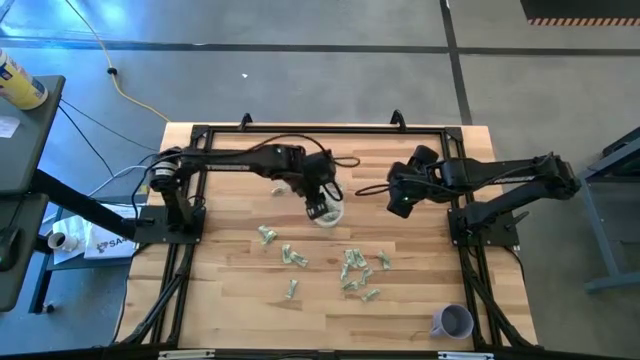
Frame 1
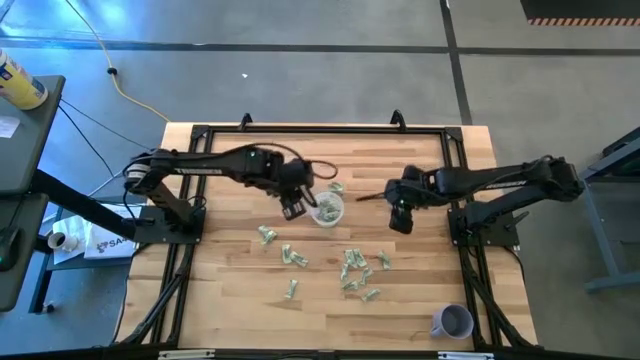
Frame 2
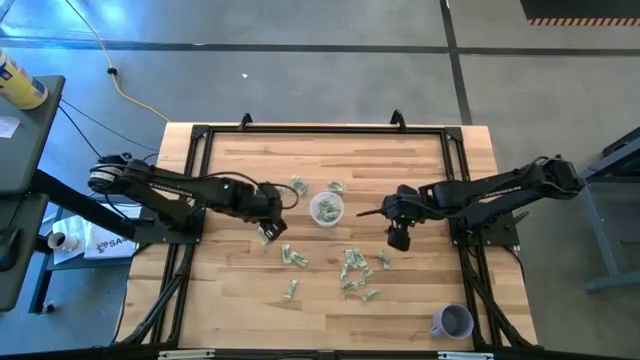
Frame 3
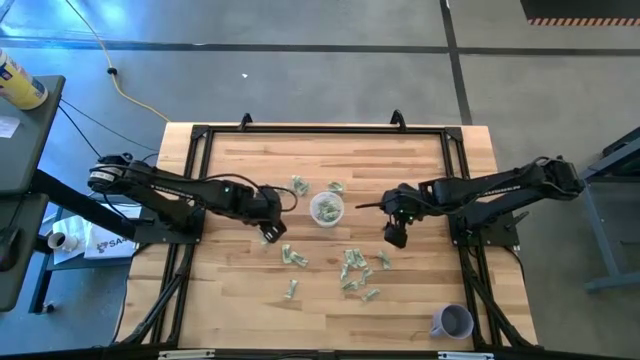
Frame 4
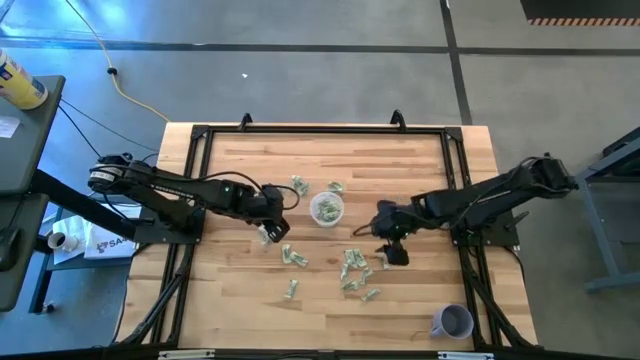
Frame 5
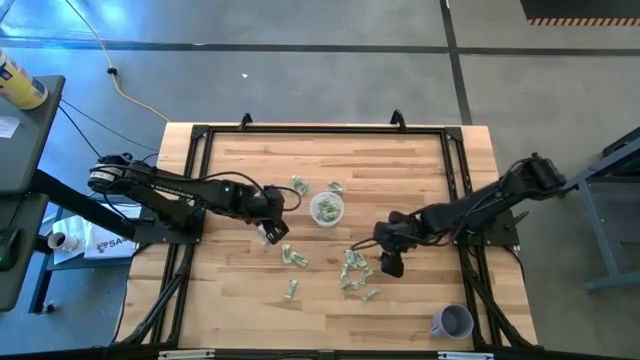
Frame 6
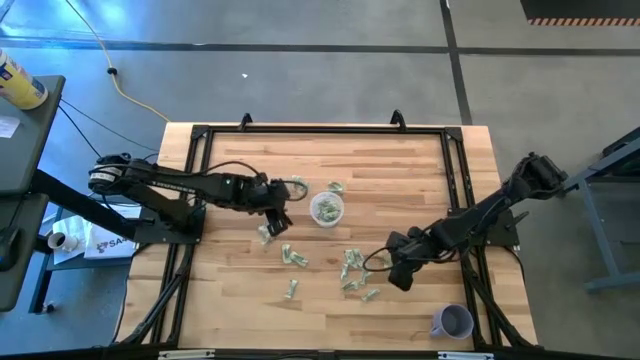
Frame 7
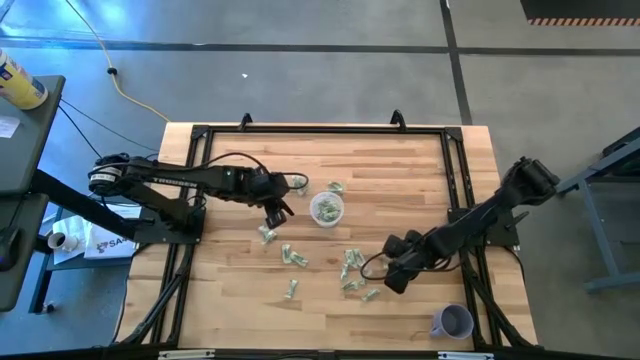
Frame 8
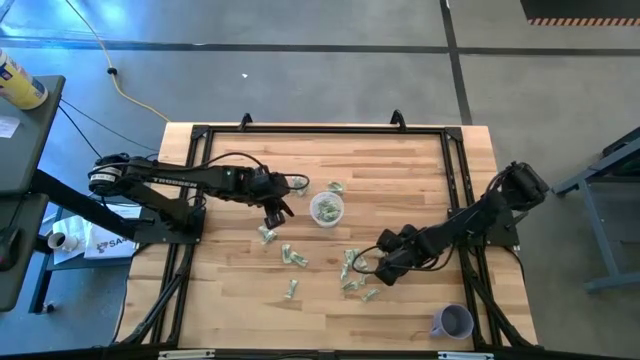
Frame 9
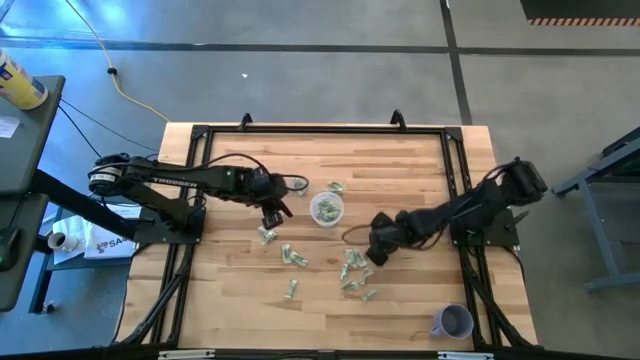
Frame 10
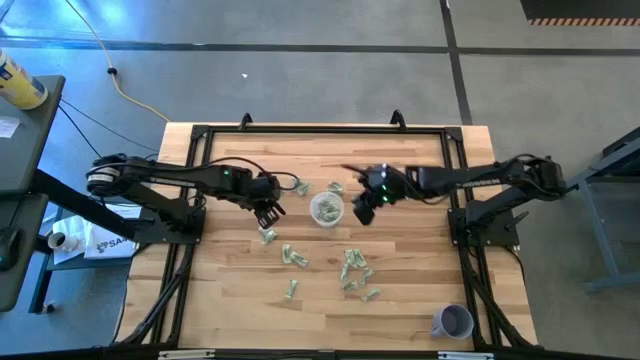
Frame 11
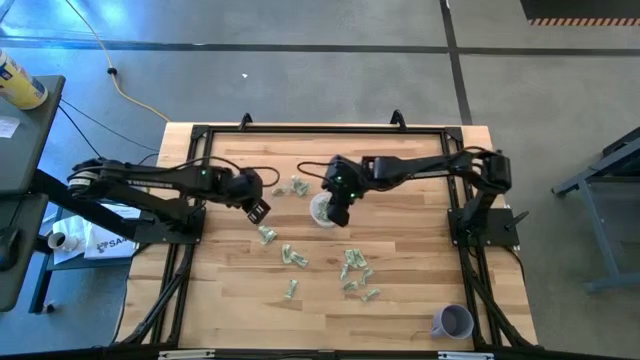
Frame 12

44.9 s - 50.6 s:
Task: Pick and place Stevia / Truvia into bins
Put the white stevia packet into the transparent container

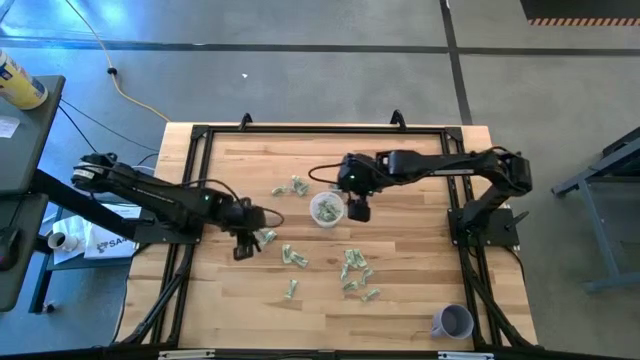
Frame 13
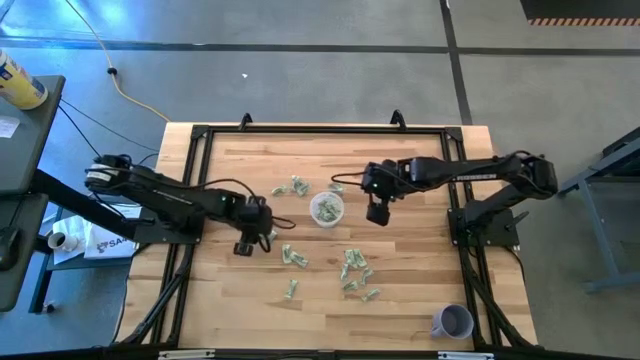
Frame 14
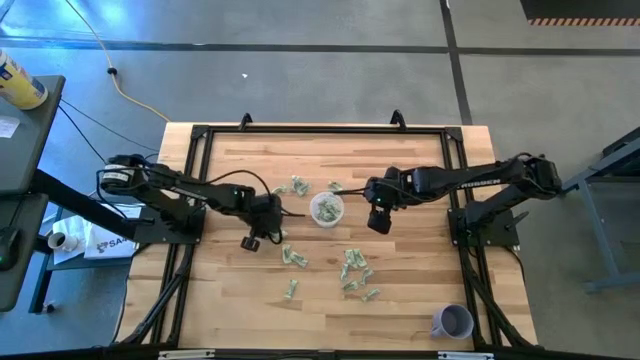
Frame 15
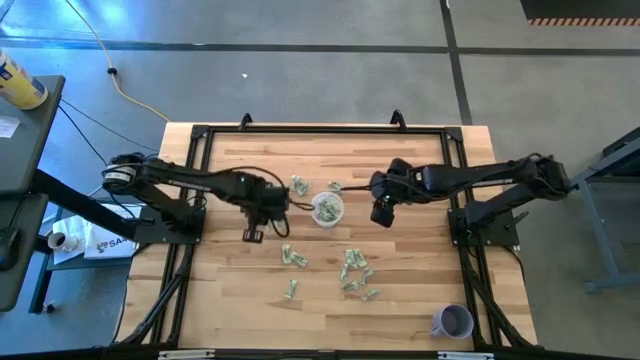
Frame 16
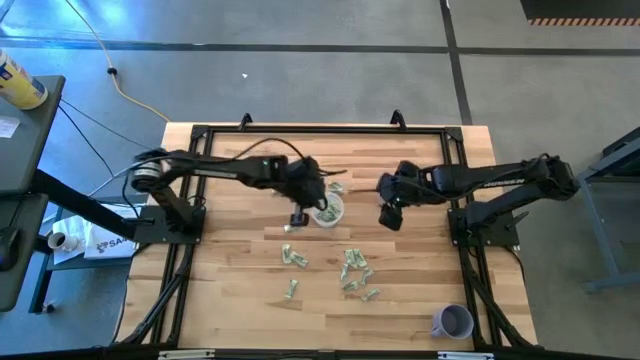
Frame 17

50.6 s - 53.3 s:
Put the white stevia packet into the transparent container

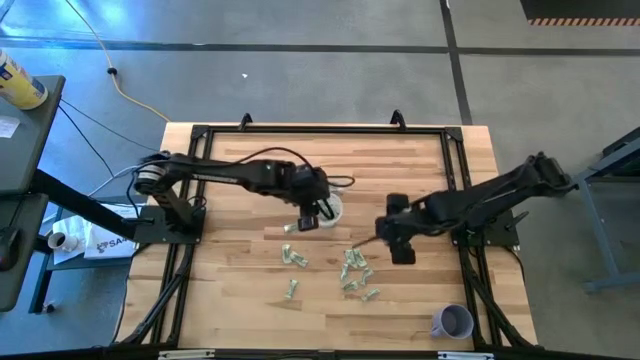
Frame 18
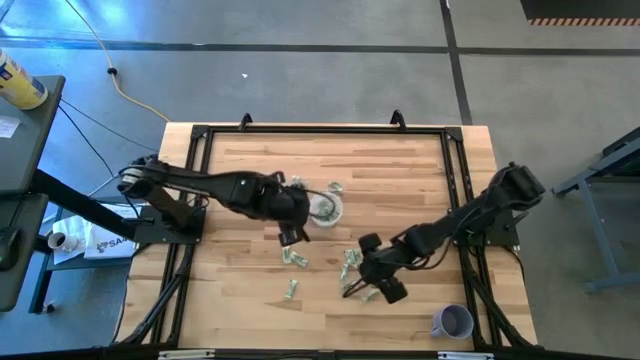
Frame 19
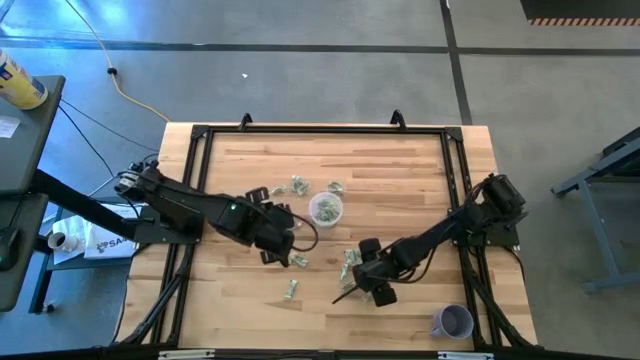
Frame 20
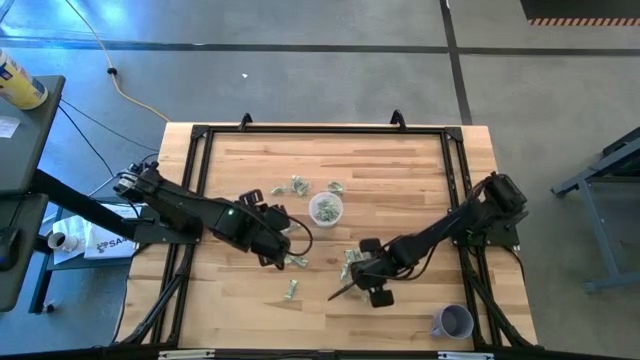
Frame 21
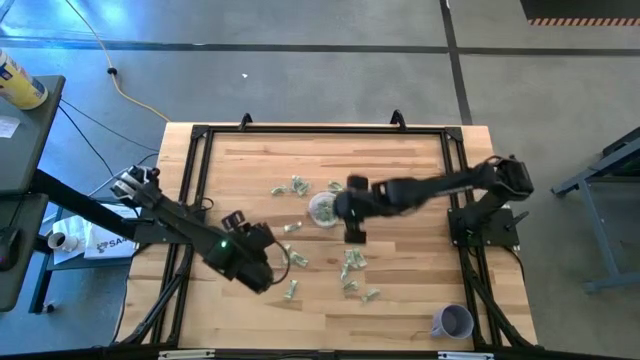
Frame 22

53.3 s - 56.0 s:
Put the white stevia packet into the transparent container

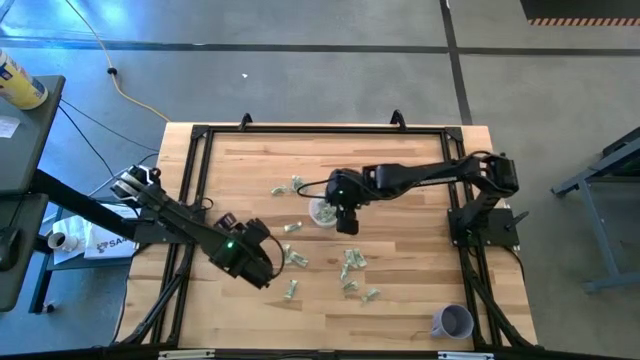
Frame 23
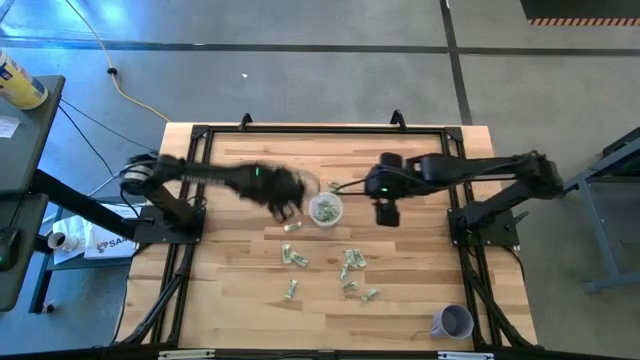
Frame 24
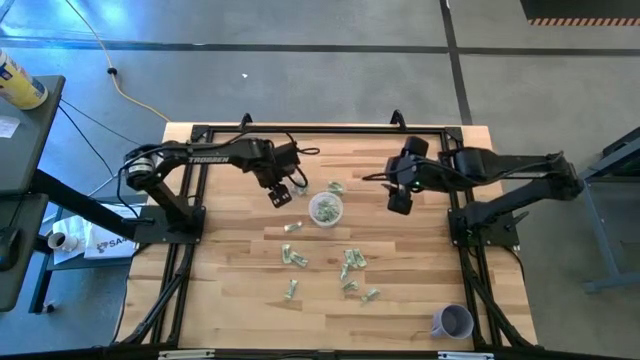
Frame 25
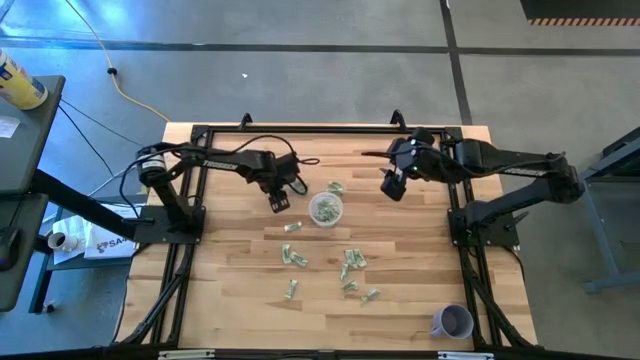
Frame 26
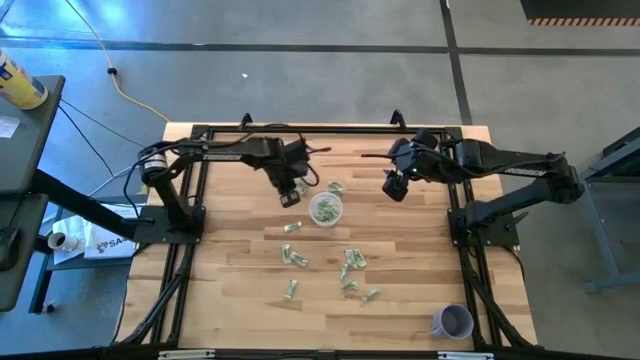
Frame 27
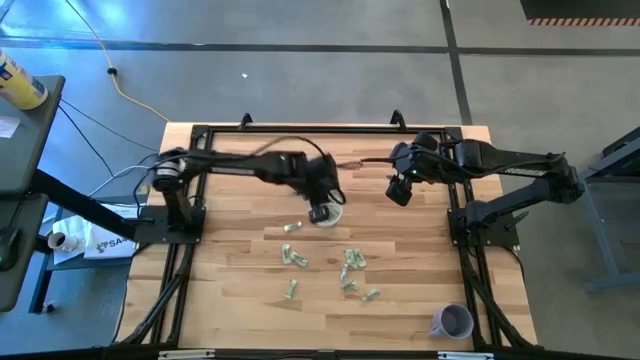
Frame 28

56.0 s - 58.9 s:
Put the white stevia packet into the transparent container

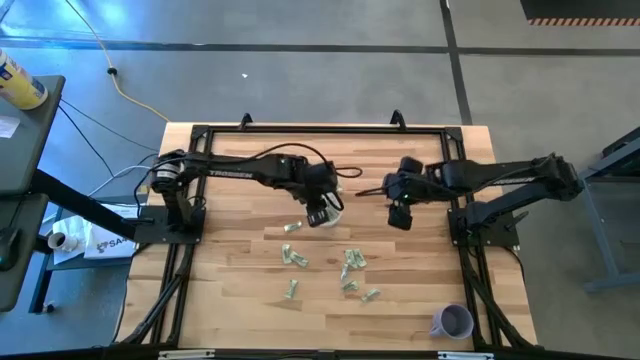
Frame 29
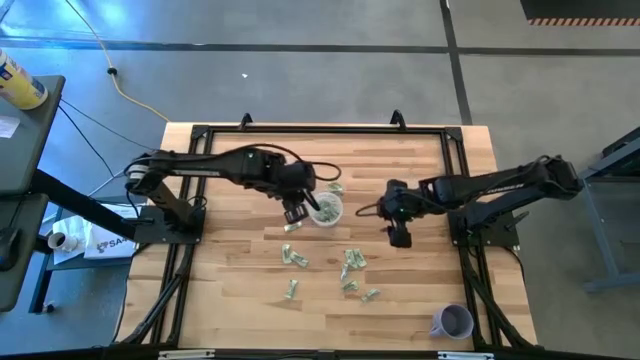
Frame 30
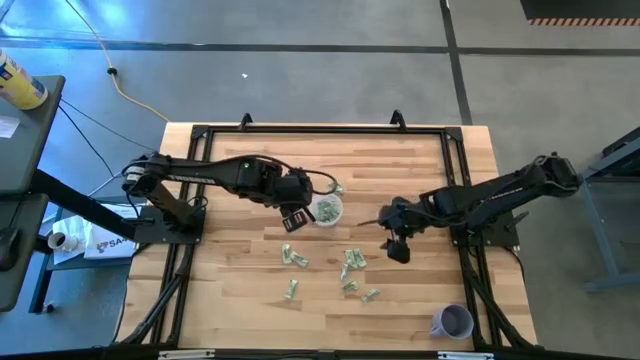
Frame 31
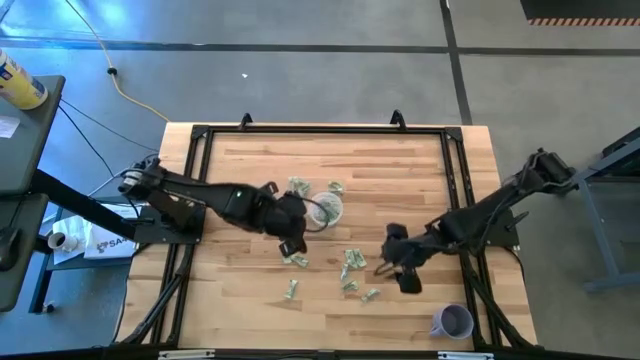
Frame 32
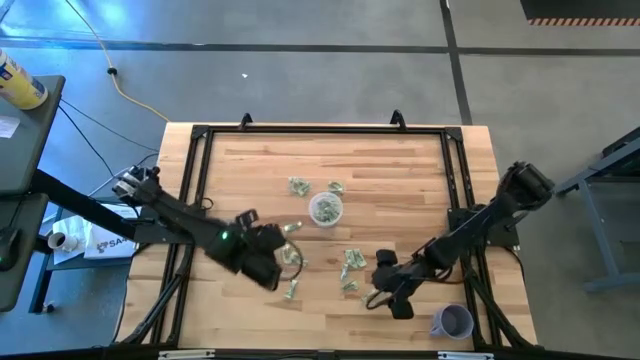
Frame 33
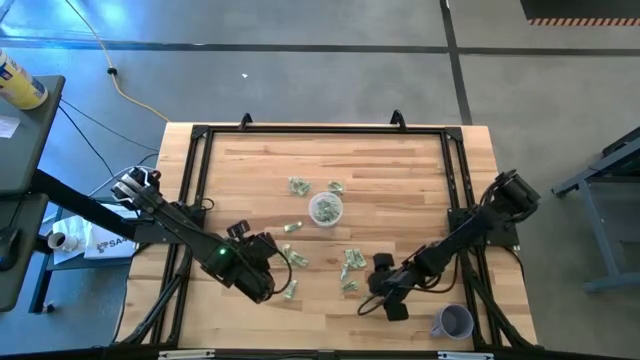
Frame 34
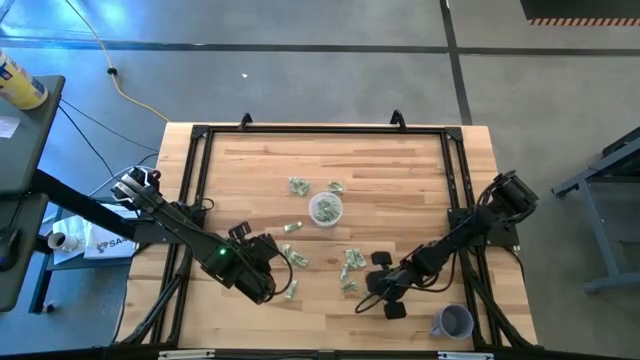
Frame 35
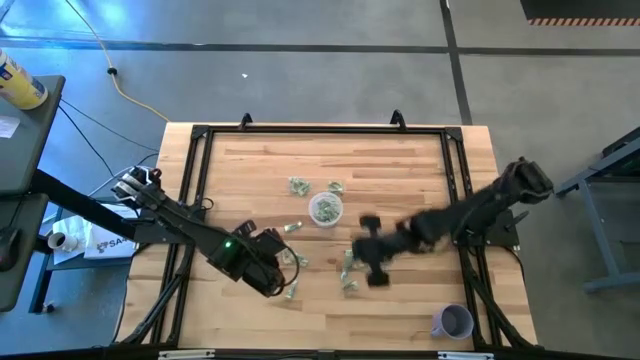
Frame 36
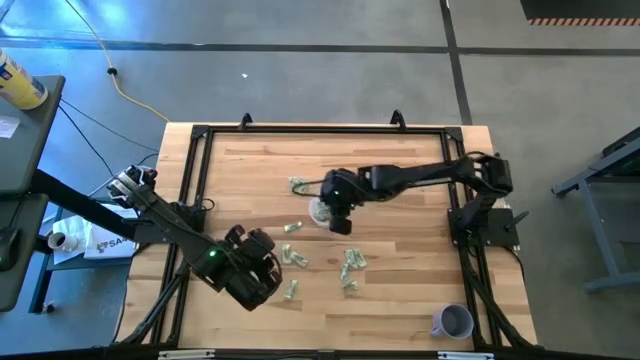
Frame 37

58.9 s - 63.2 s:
Put the white stevia packet into the transparent container

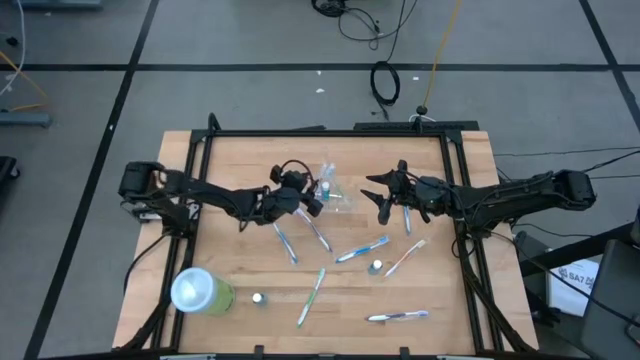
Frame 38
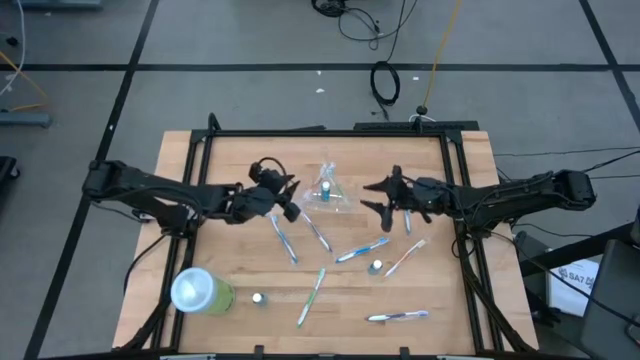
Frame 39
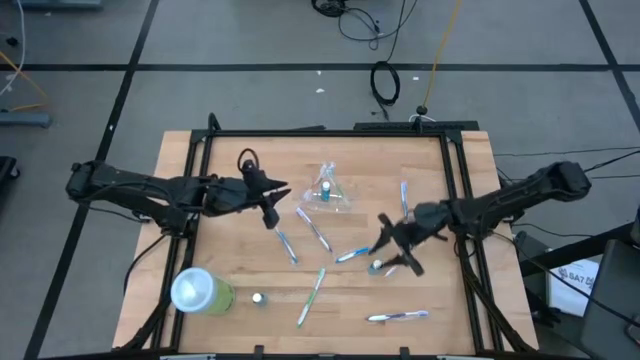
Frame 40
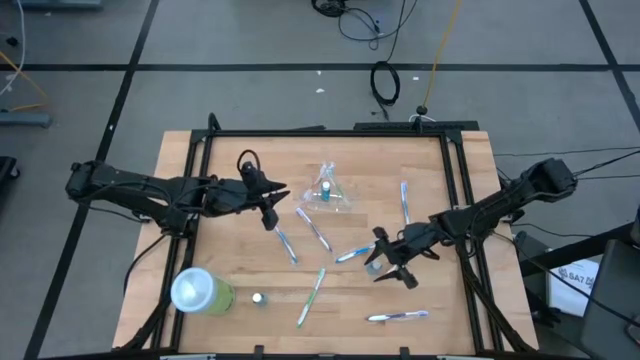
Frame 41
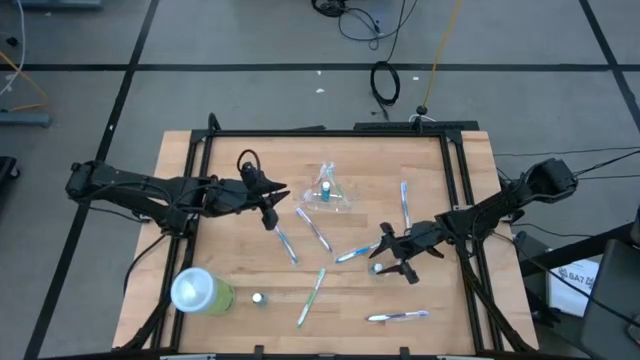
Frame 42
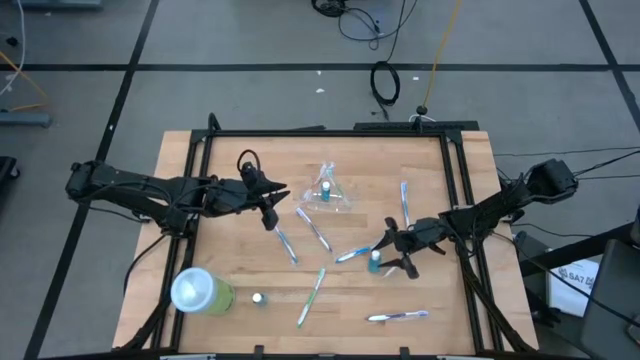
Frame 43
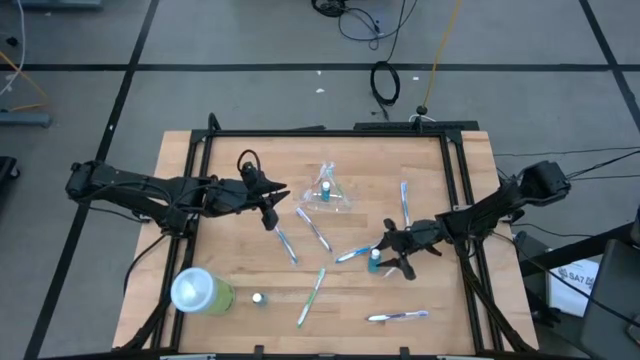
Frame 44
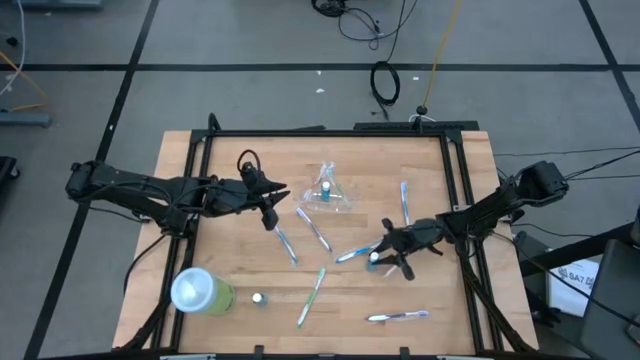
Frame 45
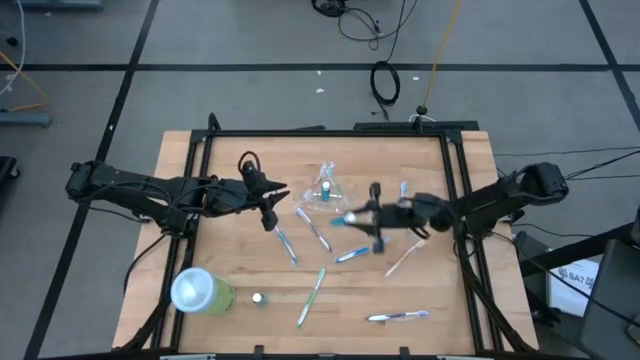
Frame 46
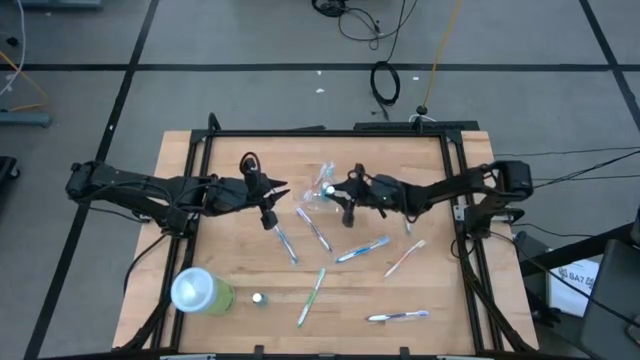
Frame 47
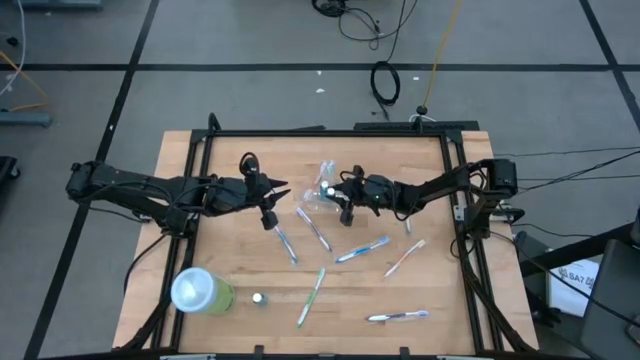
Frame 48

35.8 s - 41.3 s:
Task: Pick & Place toothbrushing station
Put the right mouthwash into the transparent organizer
